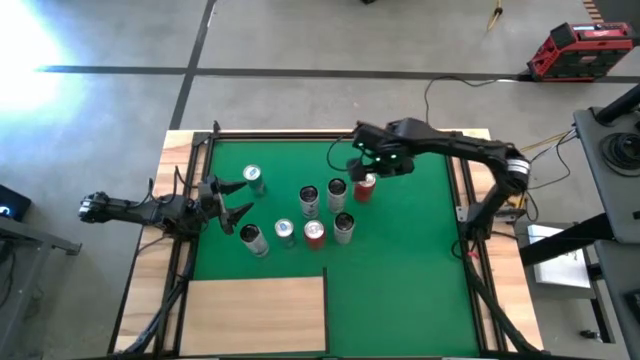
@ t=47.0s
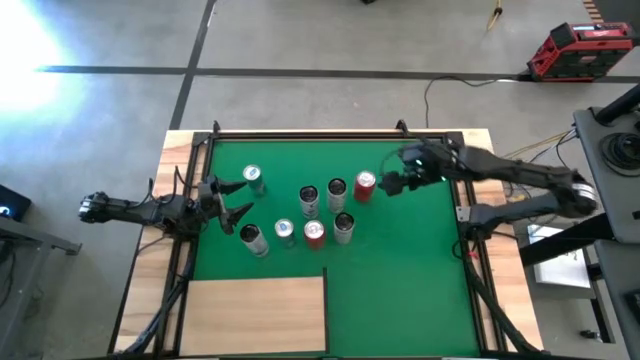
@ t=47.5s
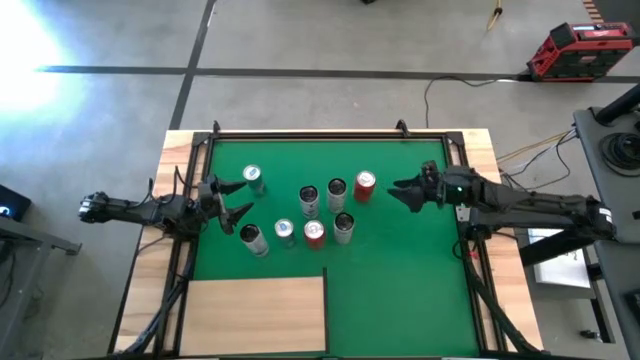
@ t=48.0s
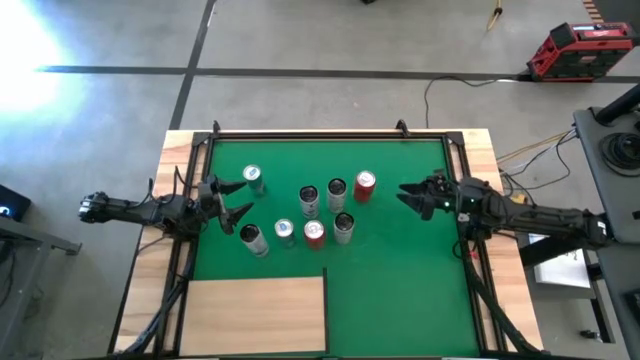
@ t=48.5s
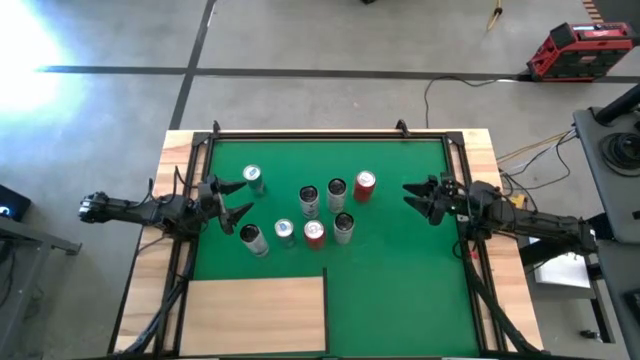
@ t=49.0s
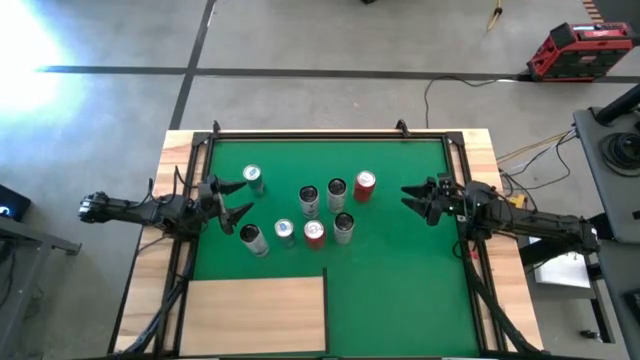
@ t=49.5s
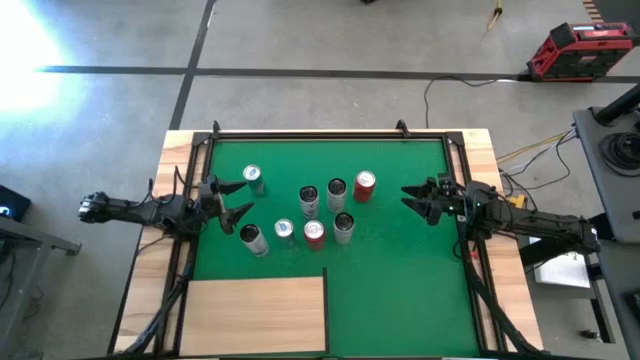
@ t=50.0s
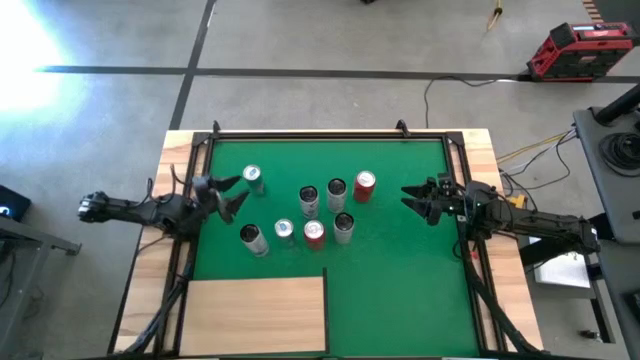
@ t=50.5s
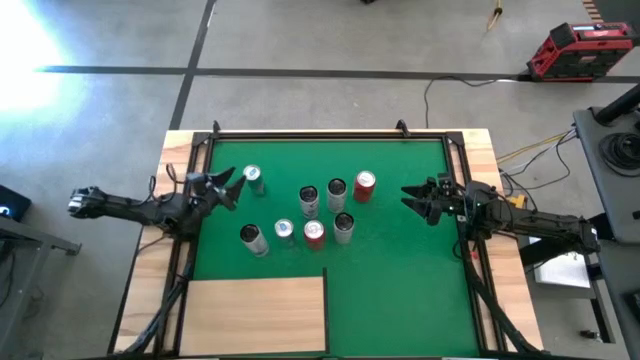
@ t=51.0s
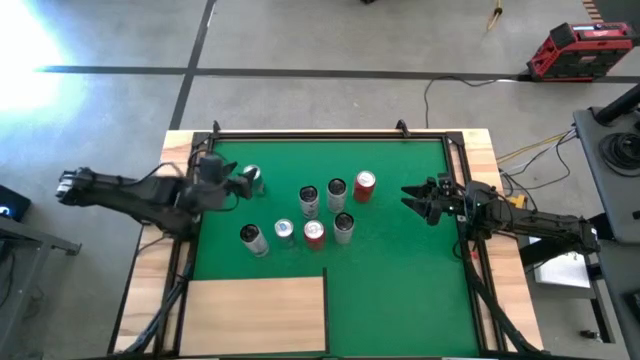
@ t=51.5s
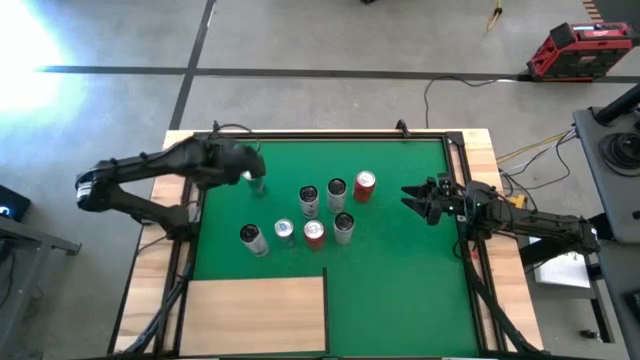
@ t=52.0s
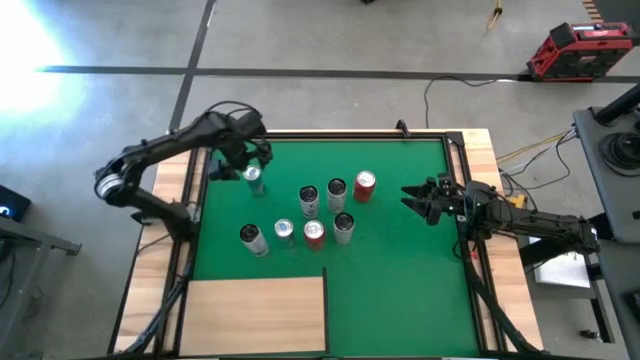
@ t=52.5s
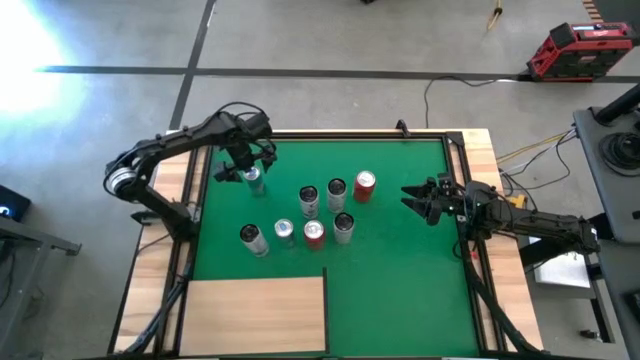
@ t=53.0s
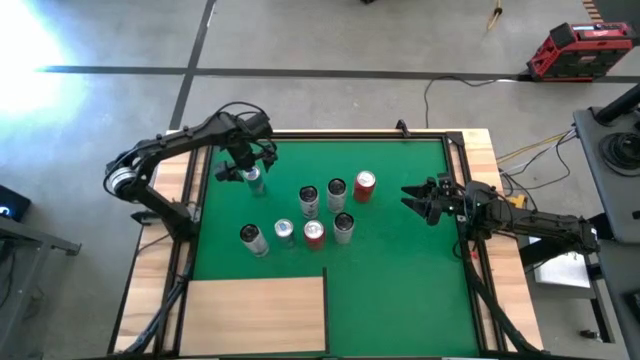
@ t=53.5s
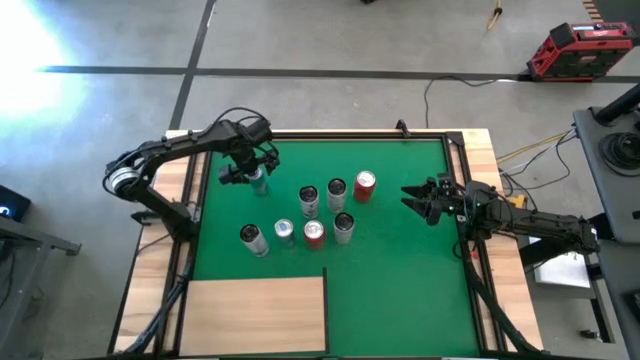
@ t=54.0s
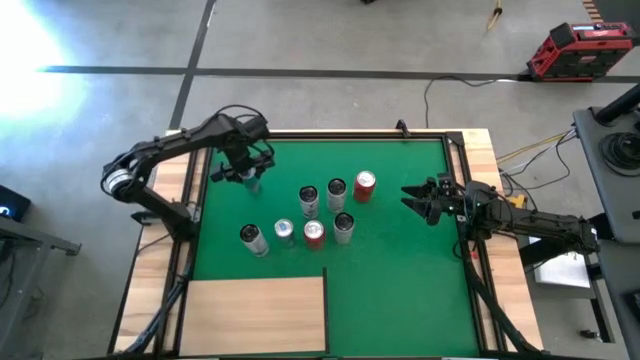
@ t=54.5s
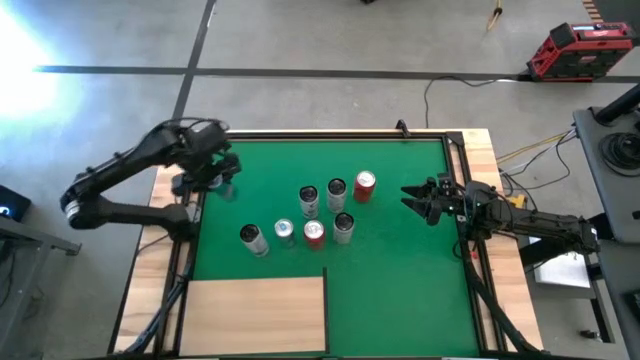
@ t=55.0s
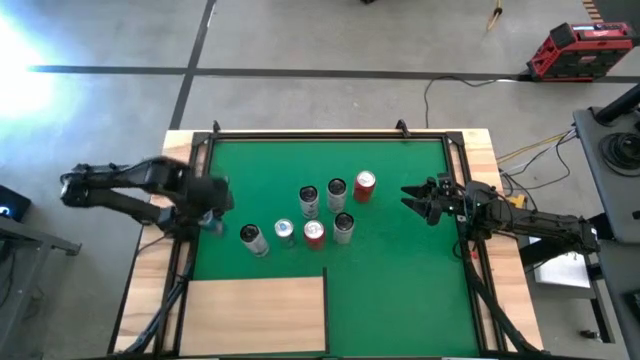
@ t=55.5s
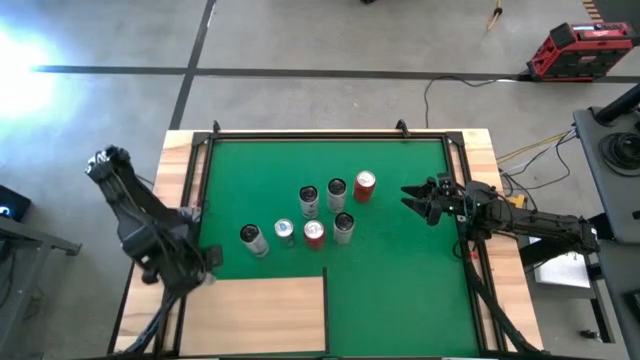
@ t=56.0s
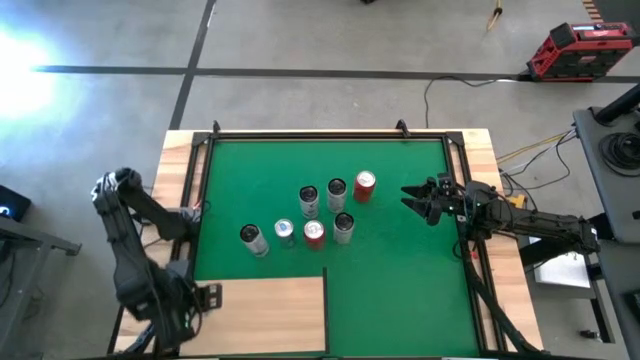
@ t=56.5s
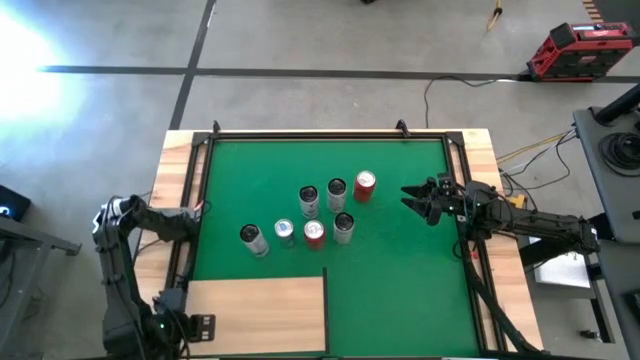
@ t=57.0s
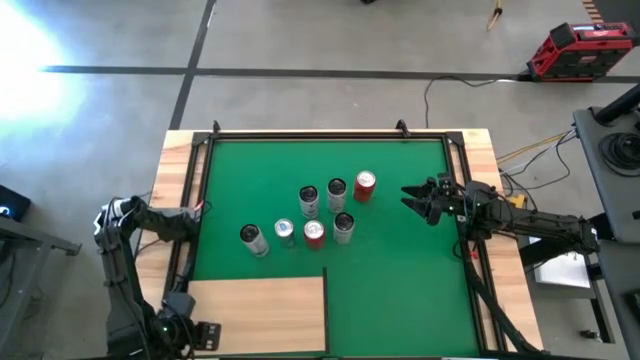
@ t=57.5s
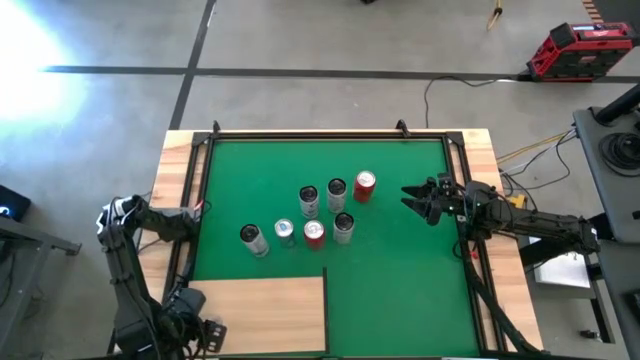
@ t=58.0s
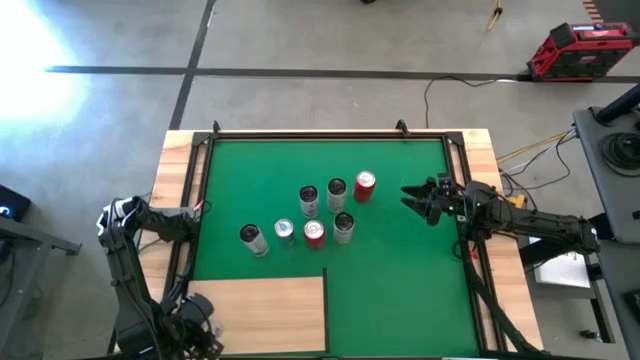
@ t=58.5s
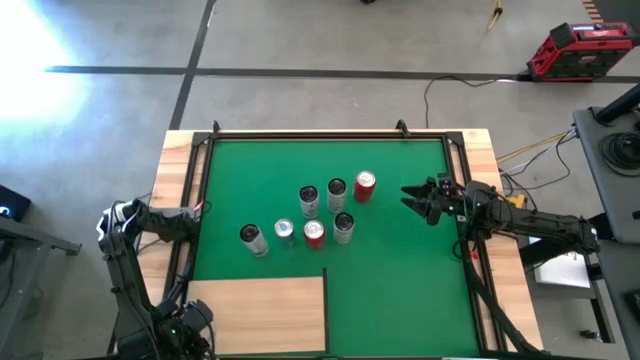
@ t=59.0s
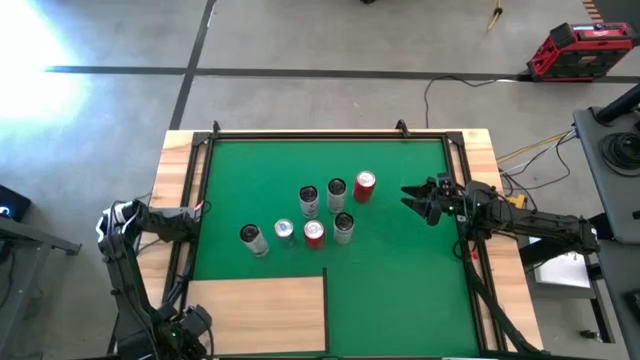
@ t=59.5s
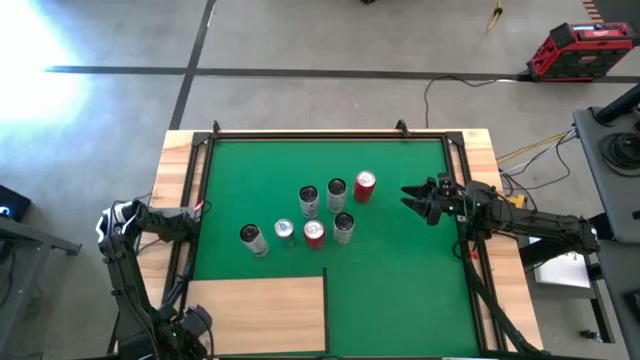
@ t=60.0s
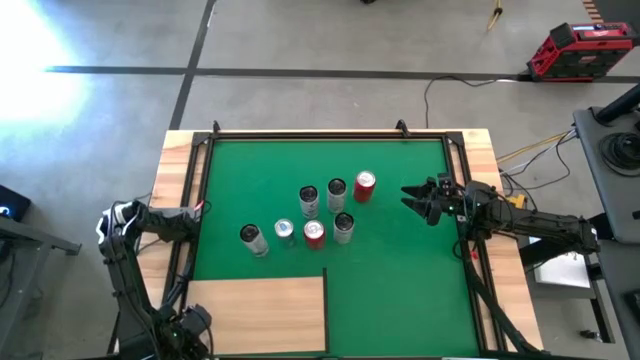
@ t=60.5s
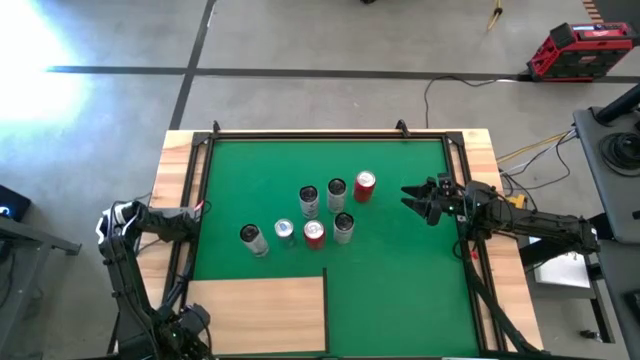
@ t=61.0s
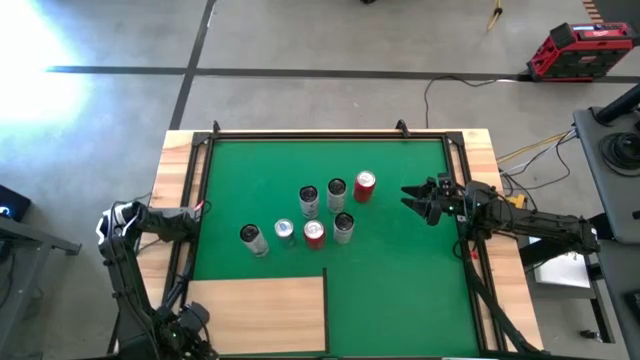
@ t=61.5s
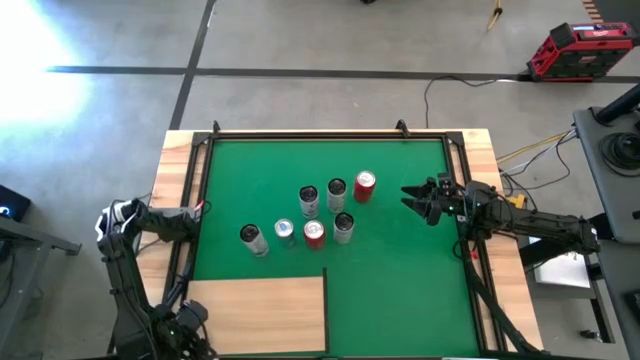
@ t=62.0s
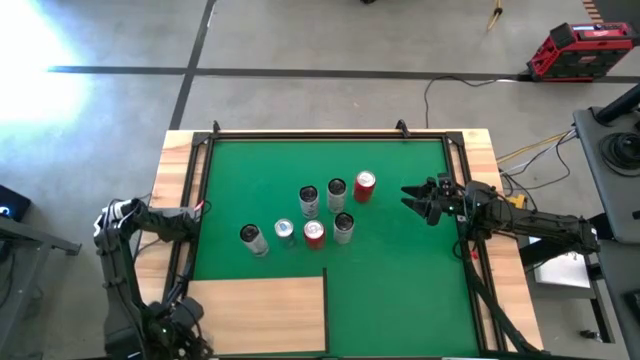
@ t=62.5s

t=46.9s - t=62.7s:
Task: Place canned beverage on shelf
Put the top blue soda can on the shelf

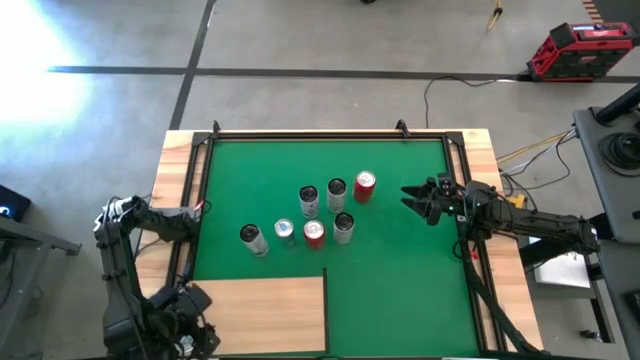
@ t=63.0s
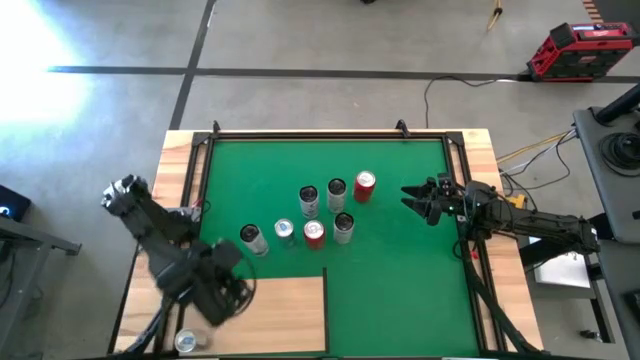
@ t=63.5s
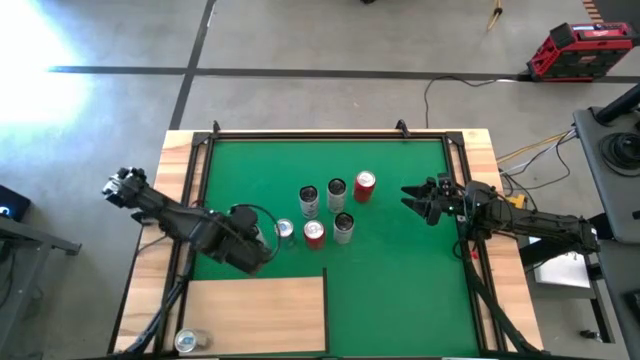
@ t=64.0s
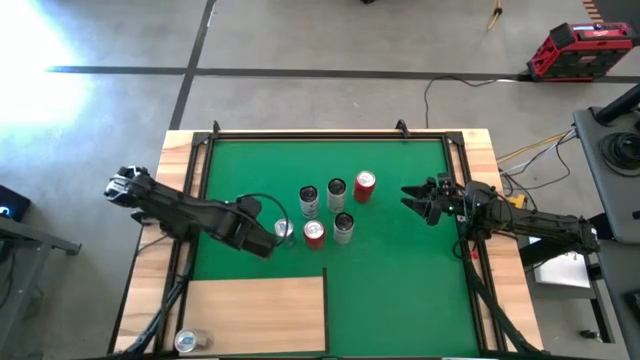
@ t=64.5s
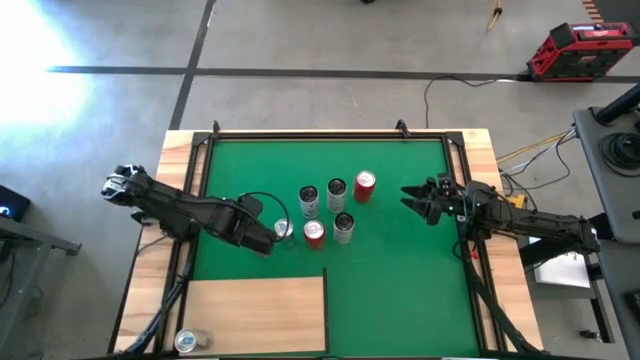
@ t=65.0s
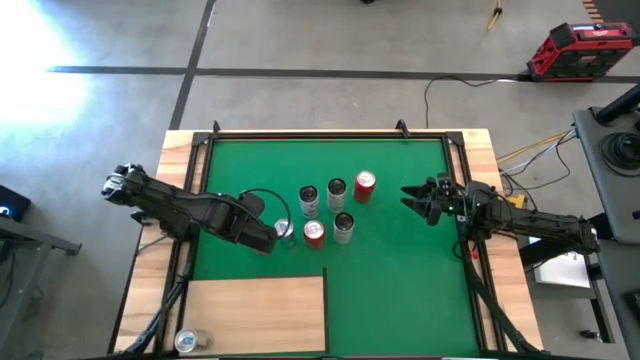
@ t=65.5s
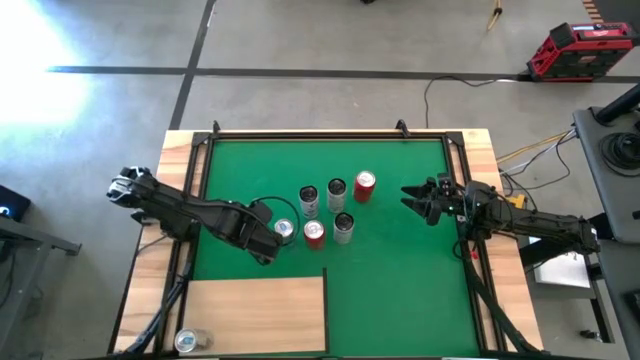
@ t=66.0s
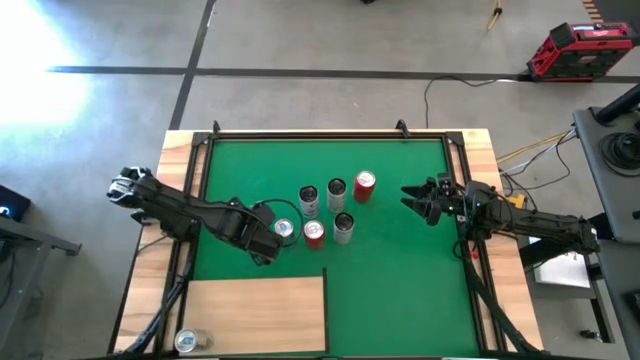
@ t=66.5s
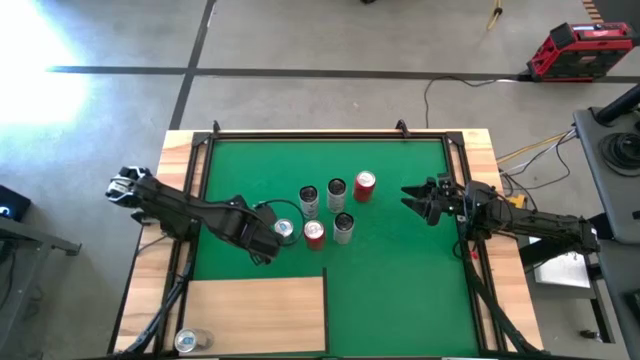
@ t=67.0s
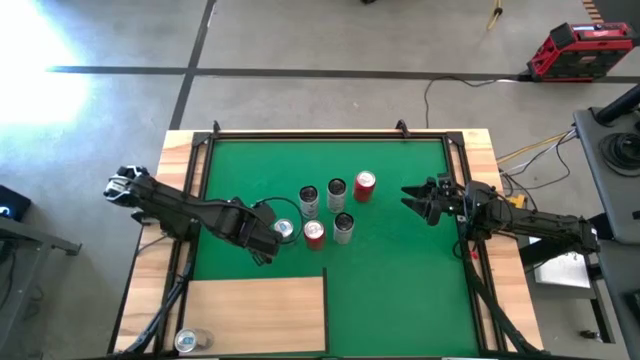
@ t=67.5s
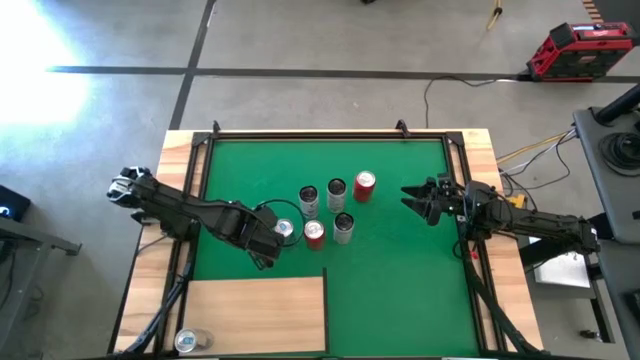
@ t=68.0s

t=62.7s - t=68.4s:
Put the bottom white and blue soda can on the shelf
